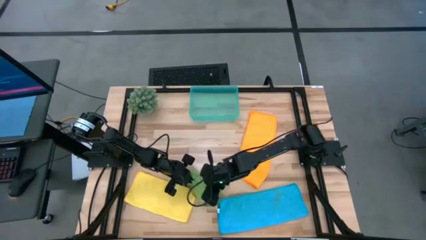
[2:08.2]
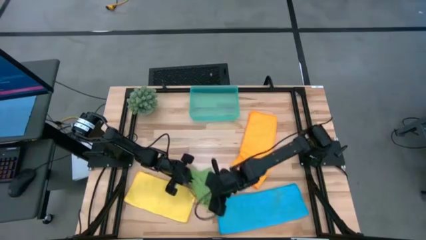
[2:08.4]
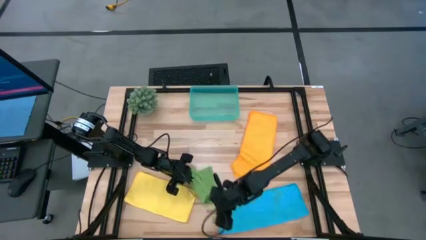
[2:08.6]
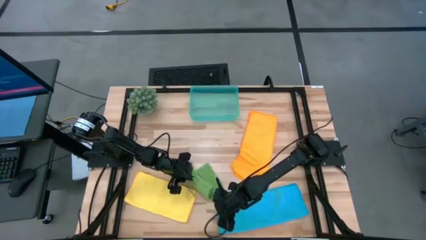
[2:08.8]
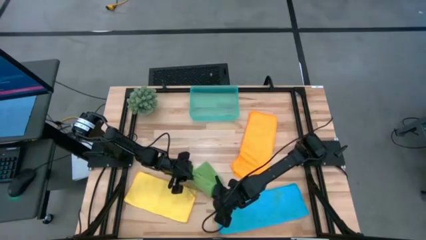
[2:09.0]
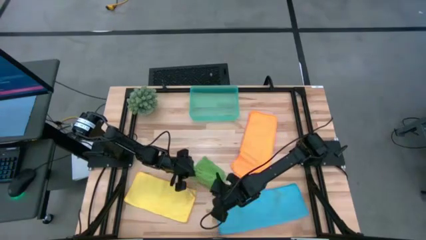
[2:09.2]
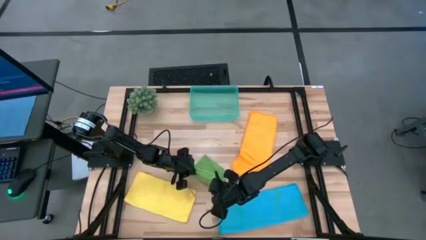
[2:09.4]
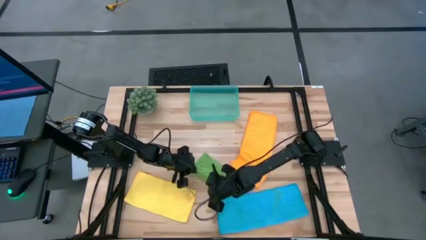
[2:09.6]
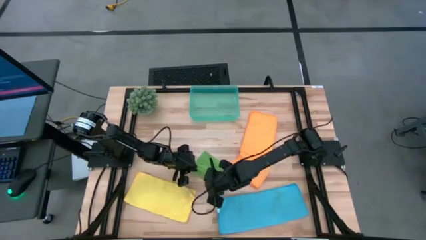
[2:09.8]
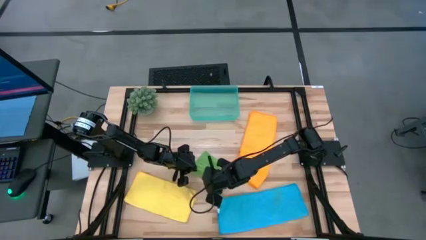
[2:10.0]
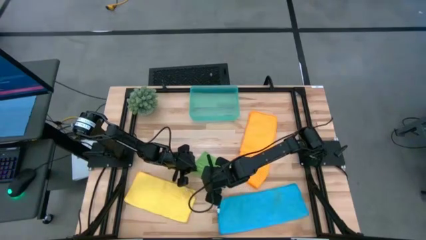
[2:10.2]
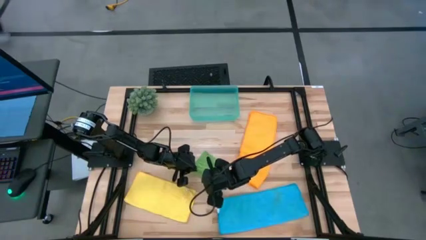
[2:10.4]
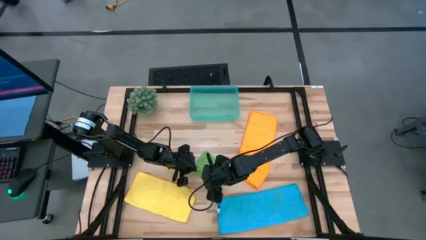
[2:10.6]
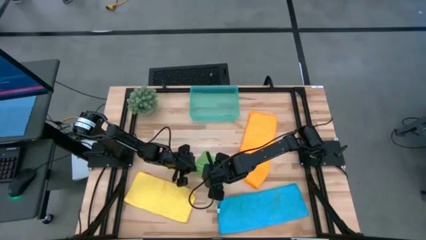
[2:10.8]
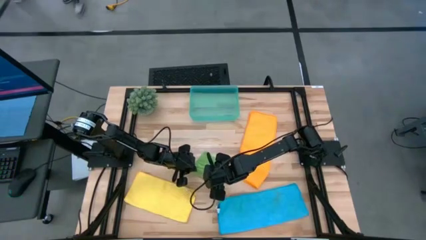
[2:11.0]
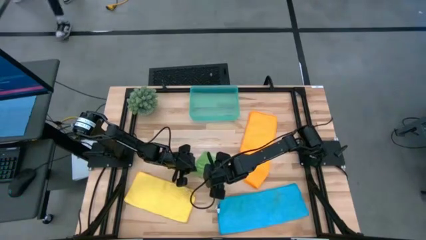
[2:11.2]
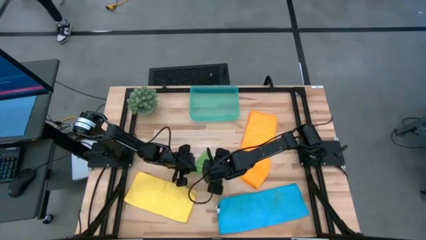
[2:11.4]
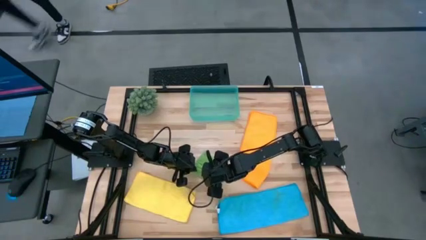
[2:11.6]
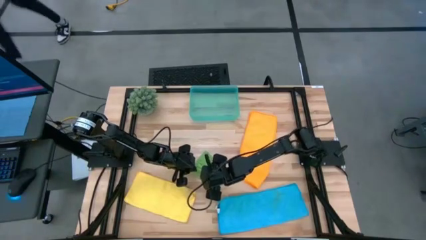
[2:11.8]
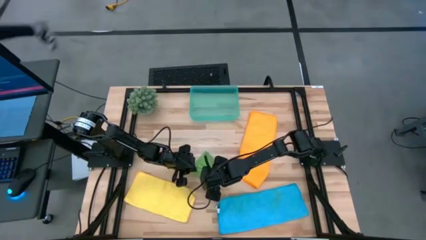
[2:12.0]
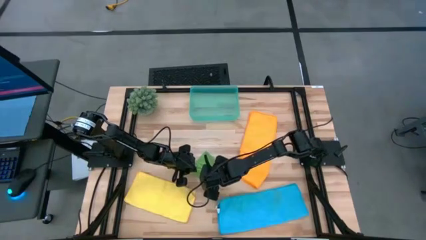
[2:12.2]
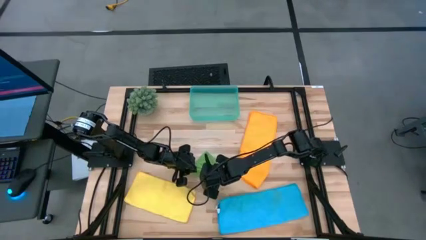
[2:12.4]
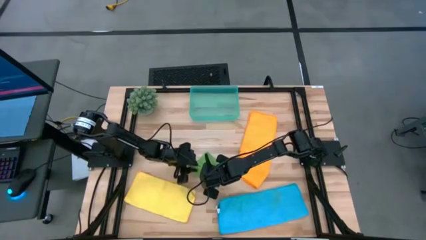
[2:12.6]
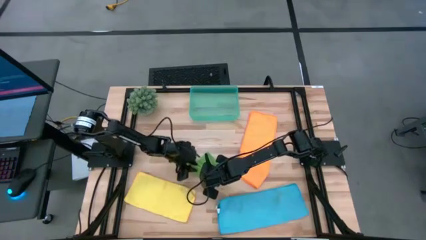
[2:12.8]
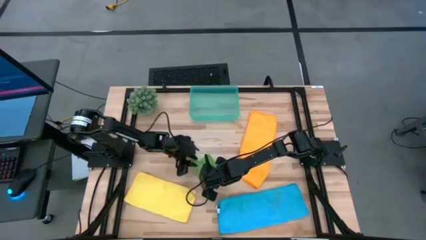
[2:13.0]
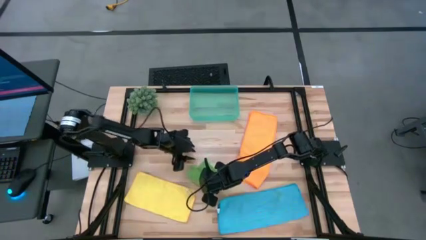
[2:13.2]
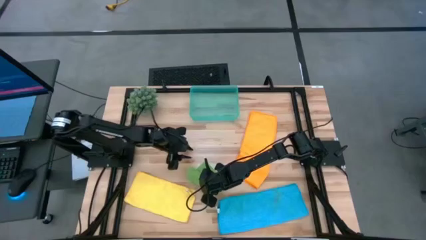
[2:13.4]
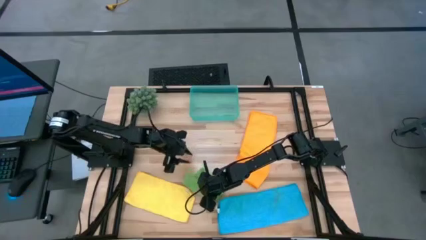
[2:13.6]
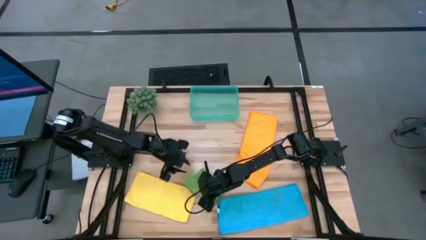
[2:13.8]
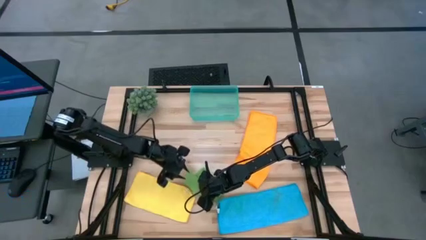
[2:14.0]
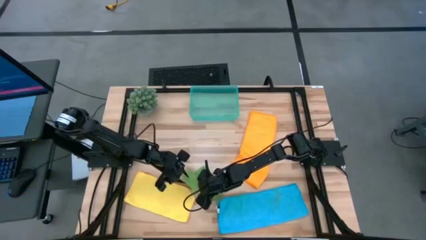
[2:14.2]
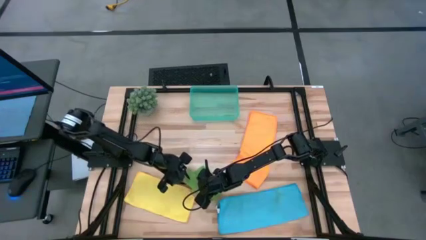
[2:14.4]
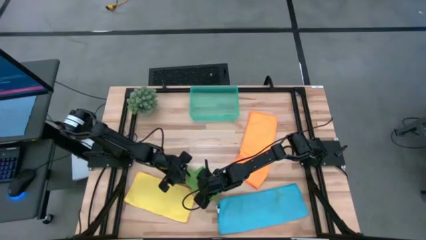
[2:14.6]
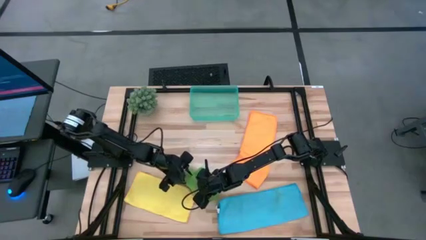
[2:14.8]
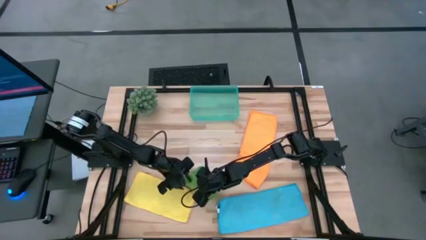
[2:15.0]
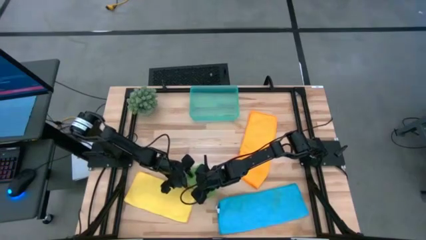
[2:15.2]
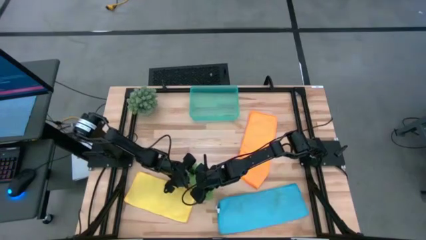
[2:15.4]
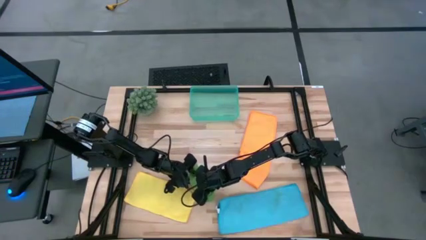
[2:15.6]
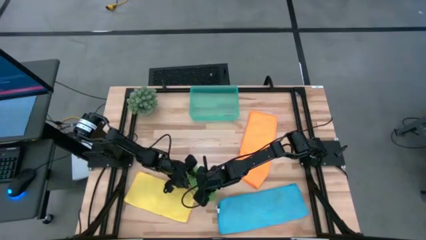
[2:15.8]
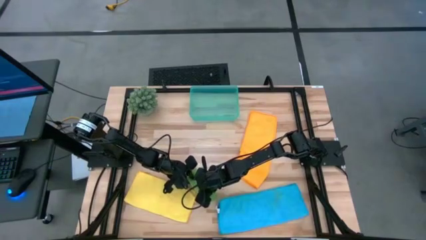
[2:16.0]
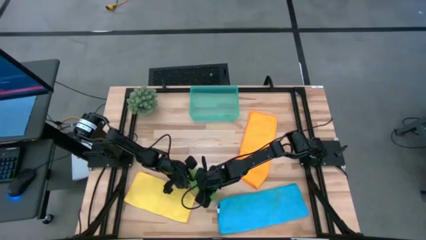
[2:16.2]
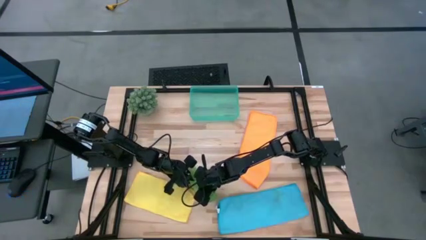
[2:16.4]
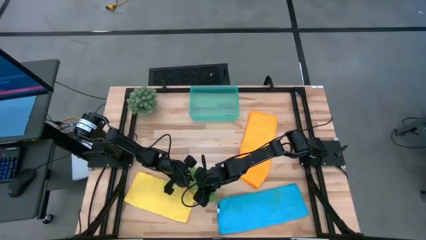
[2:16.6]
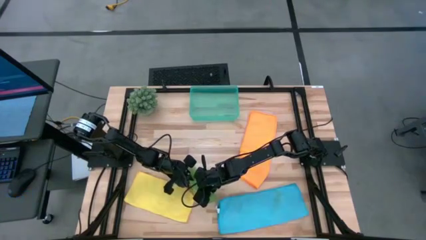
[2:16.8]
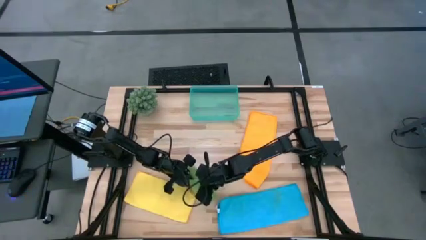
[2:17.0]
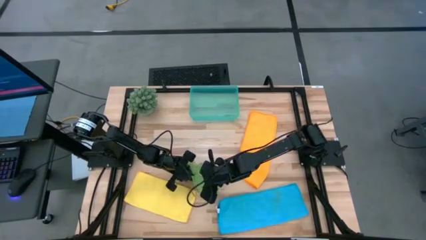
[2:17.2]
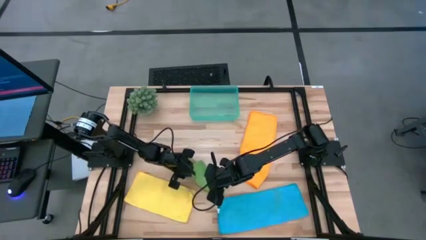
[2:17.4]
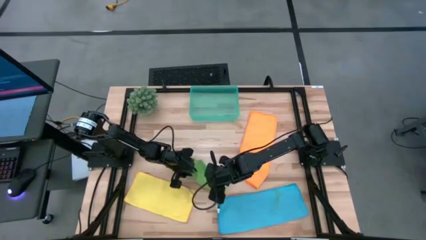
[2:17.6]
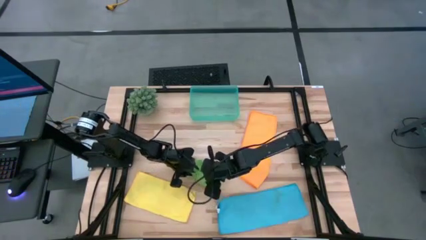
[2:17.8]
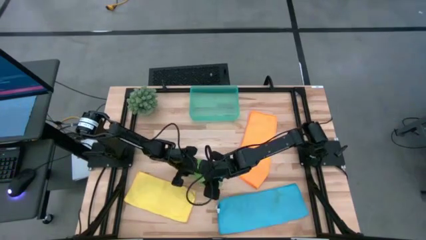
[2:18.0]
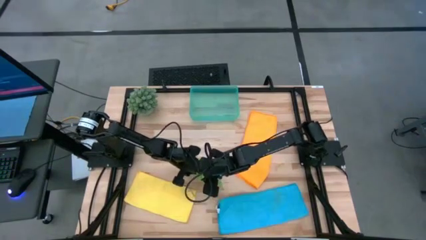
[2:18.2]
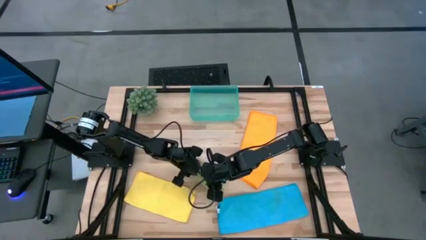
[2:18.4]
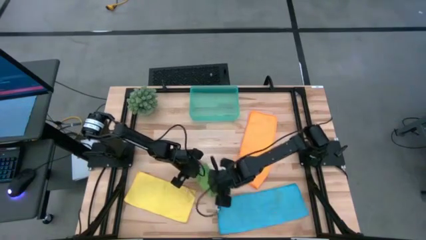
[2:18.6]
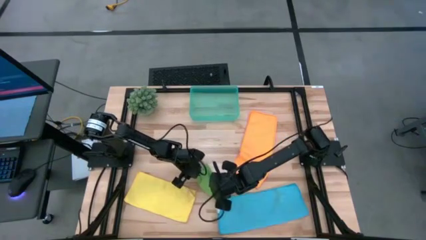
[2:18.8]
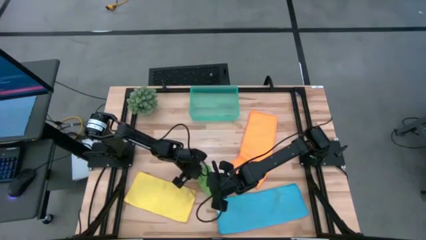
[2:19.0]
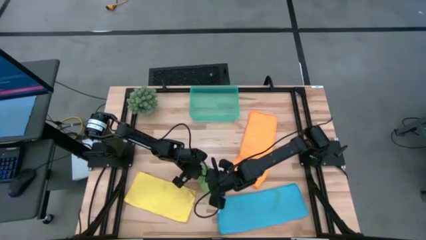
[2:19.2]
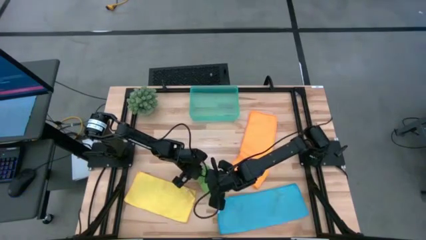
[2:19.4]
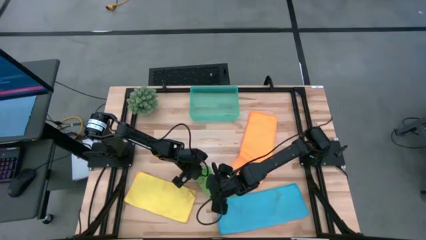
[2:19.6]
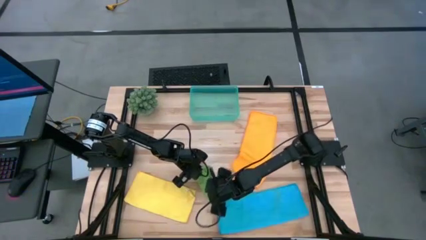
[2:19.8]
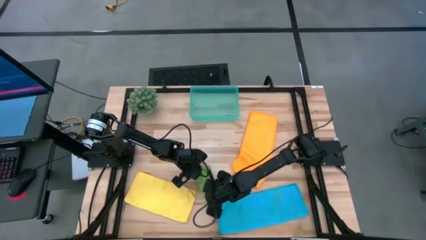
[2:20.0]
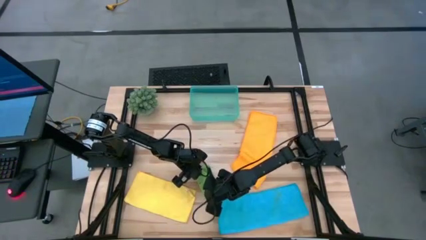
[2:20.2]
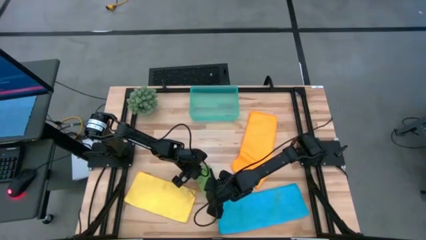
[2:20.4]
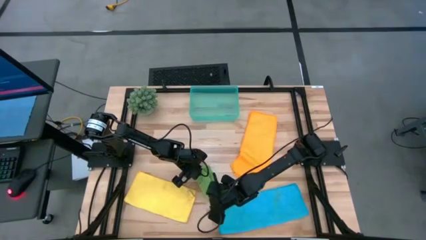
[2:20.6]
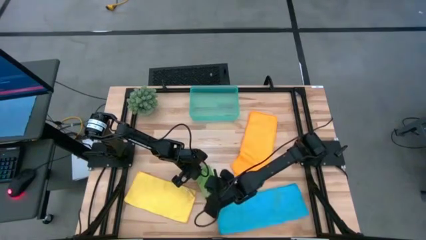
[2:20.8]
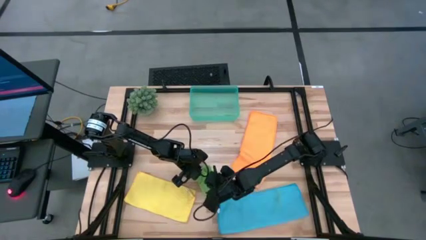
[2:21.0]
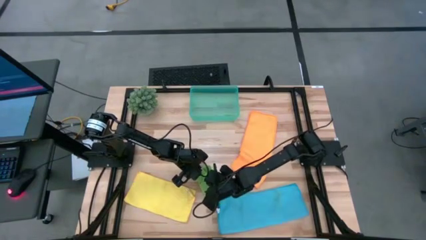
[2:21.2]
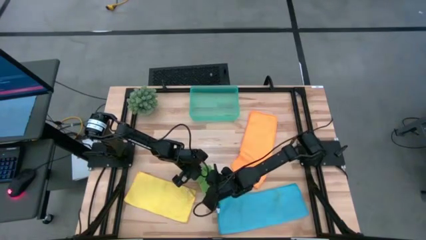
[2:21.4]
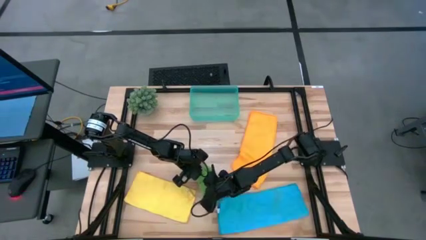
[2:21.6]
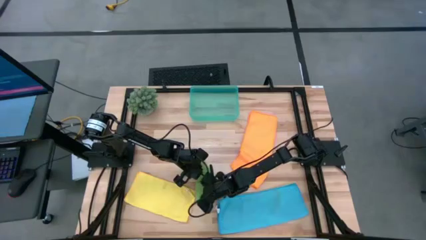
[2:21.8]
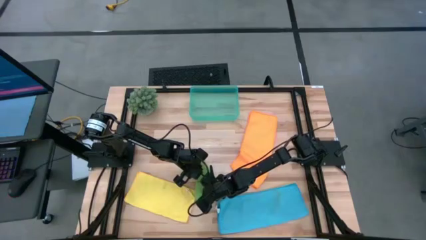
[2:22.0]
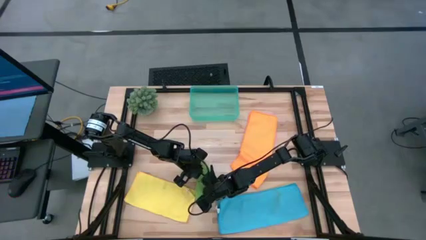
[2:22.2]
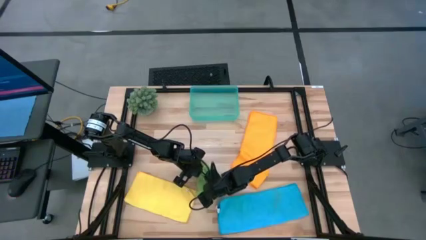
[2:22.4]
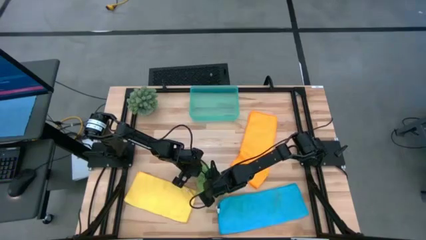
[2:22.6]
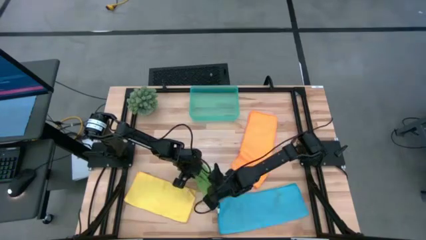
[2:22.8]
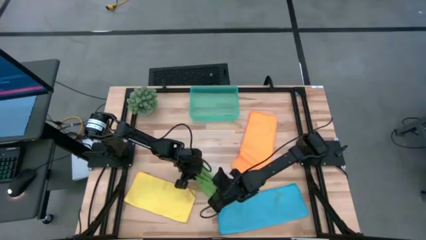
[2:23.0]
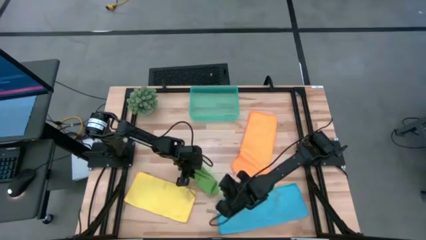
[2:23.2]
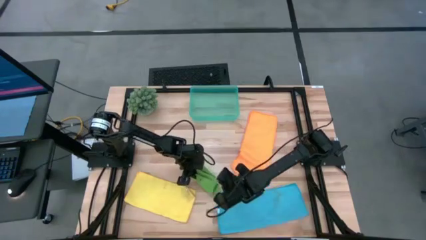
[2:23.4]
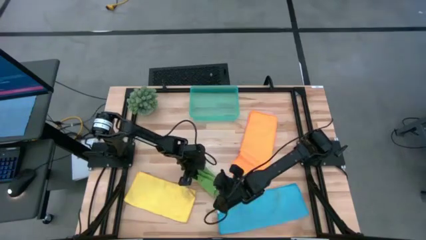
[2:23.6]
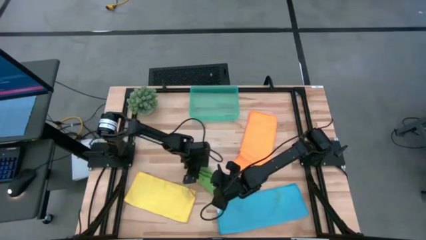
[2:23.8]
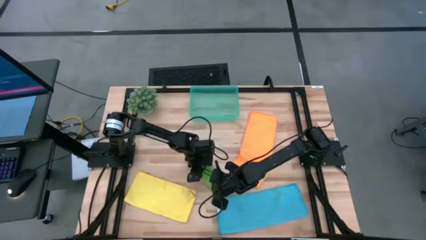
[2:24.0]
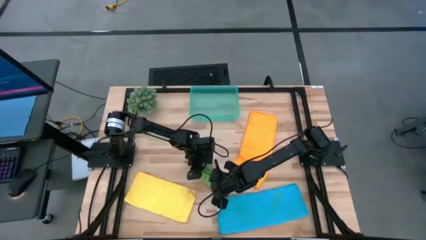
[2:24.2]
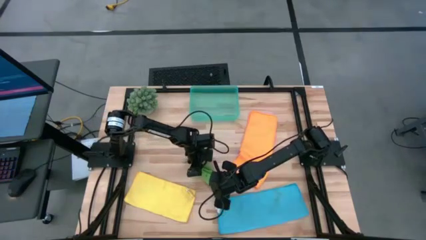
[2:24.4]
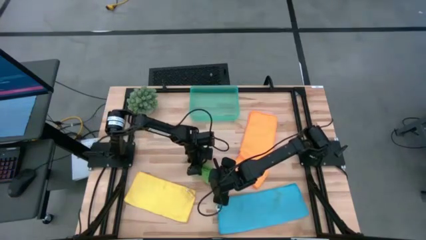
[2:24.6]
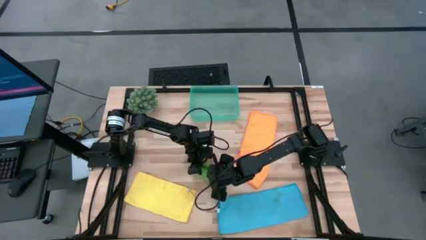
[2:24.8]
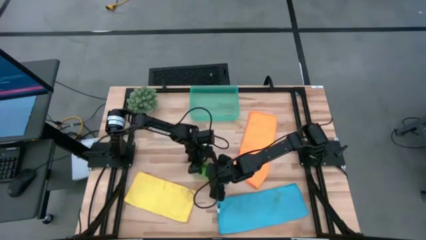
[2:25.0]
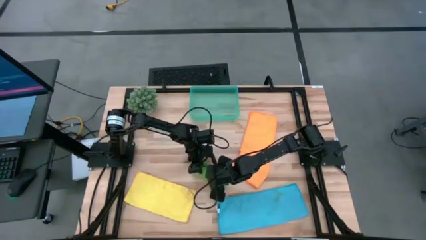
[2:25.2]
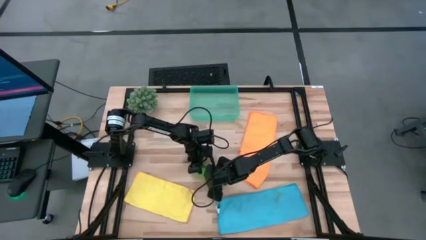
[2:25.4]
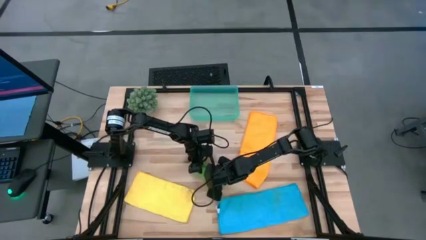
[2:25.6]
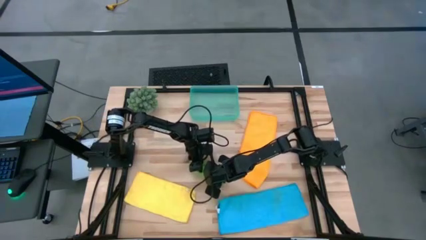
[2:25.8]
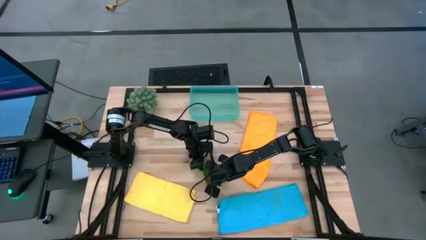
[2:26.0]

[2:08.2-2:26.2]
Task: Roll microfiber towels into tight, uniform cylinder then place into a basket
Roll the green towel
